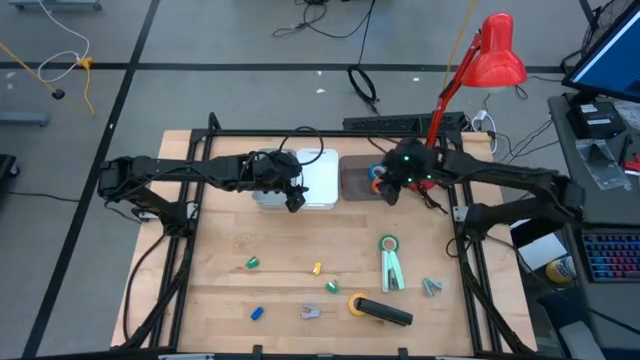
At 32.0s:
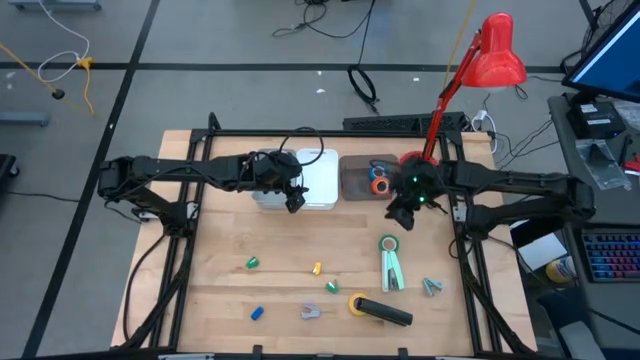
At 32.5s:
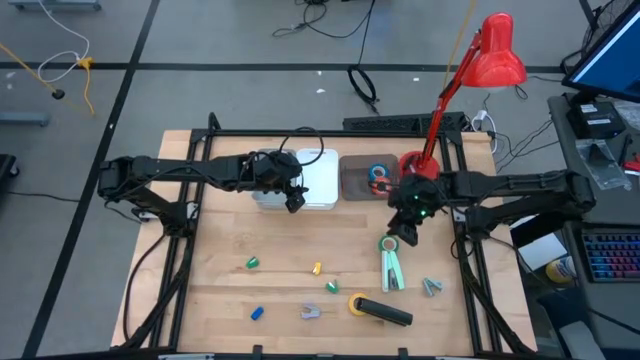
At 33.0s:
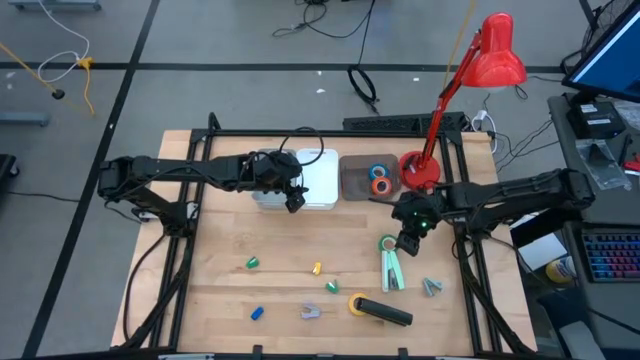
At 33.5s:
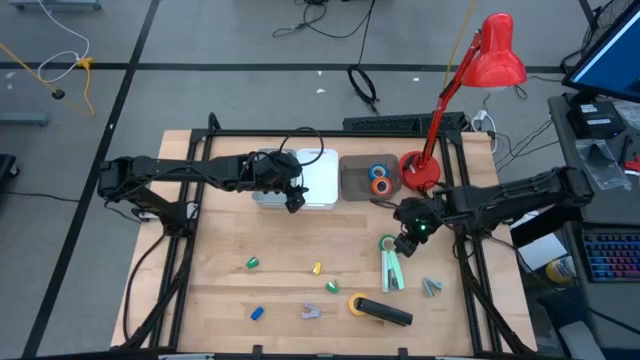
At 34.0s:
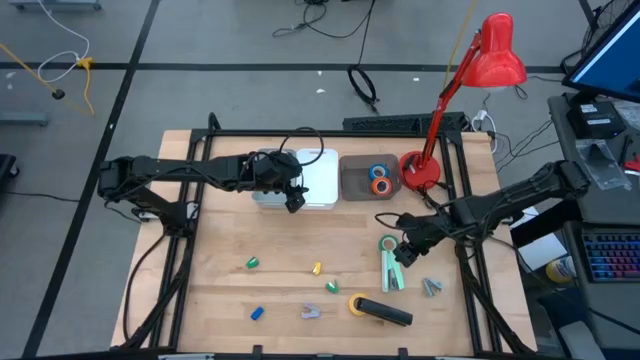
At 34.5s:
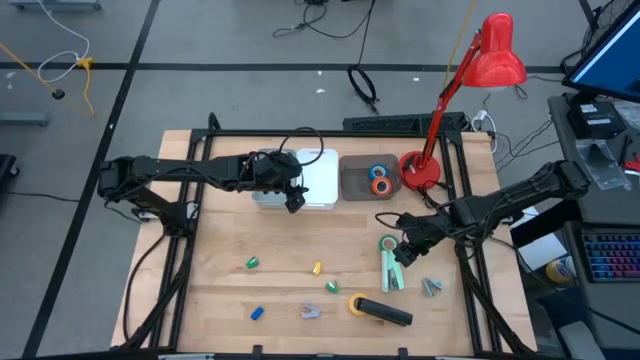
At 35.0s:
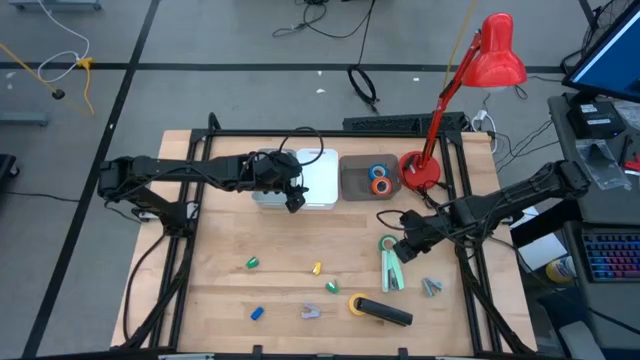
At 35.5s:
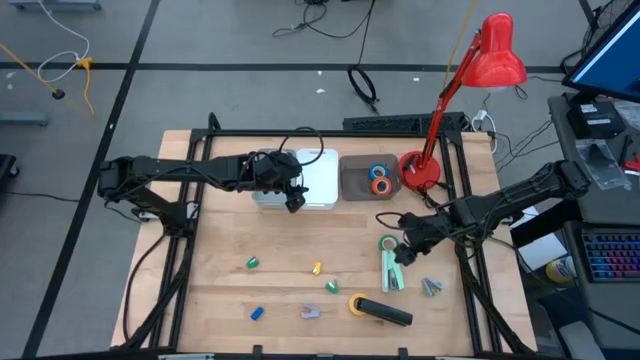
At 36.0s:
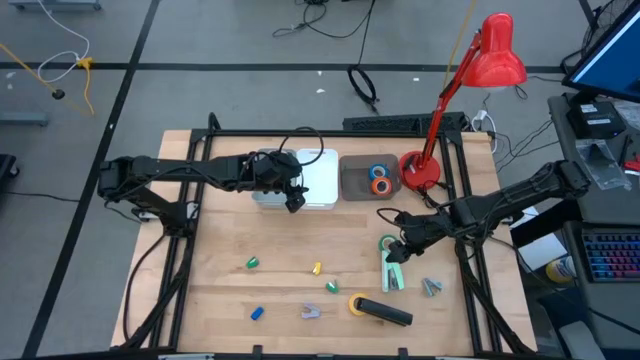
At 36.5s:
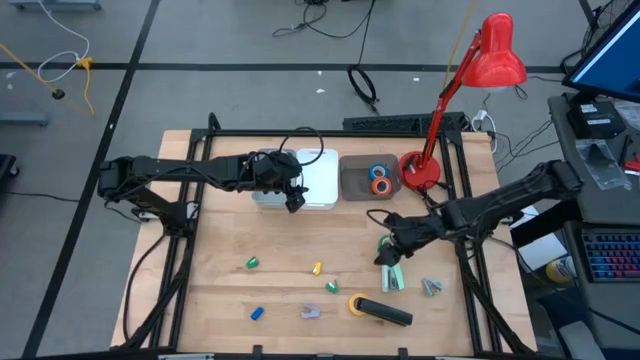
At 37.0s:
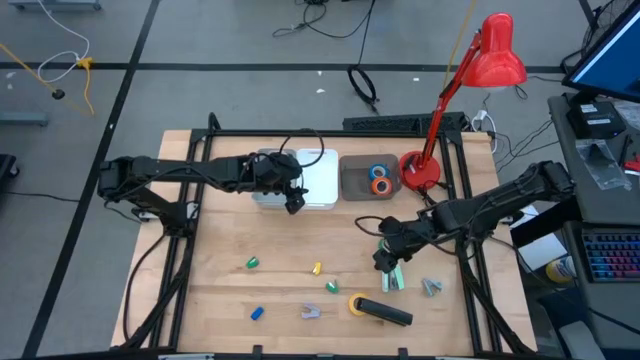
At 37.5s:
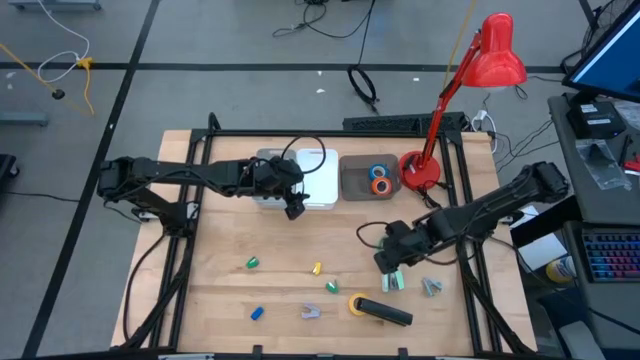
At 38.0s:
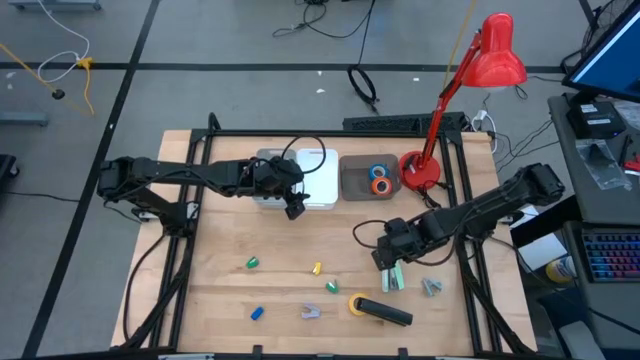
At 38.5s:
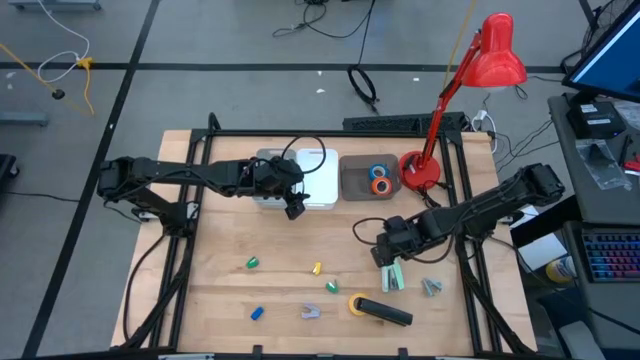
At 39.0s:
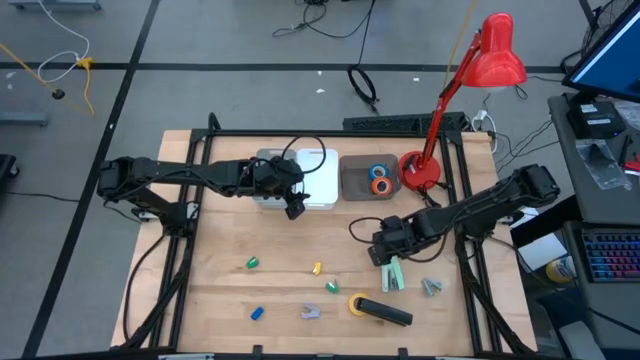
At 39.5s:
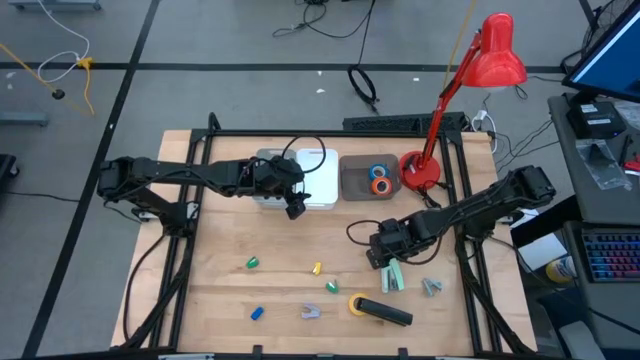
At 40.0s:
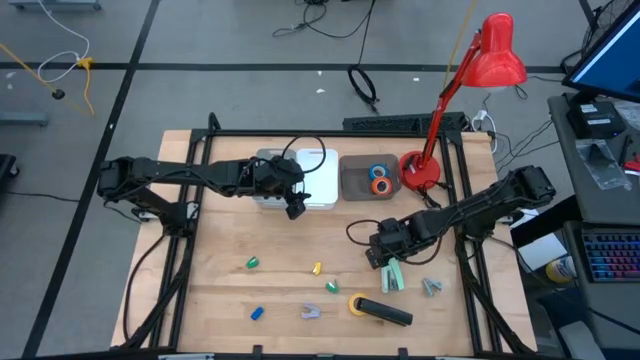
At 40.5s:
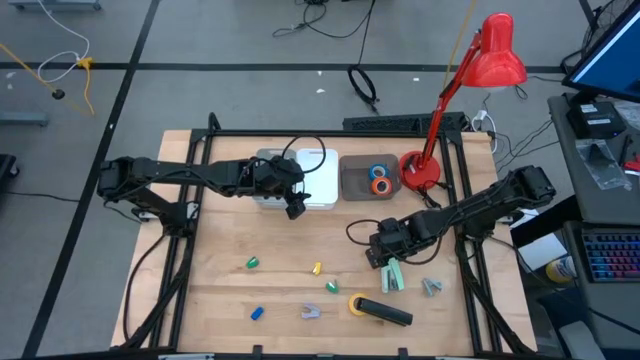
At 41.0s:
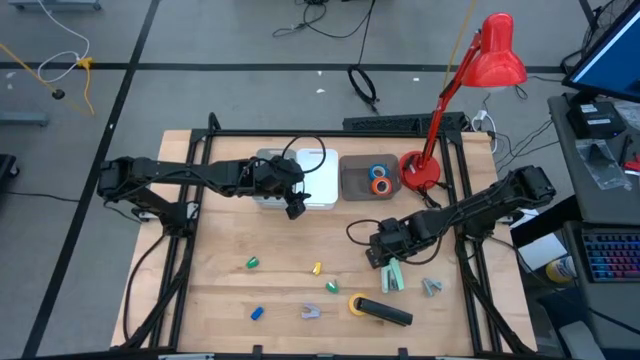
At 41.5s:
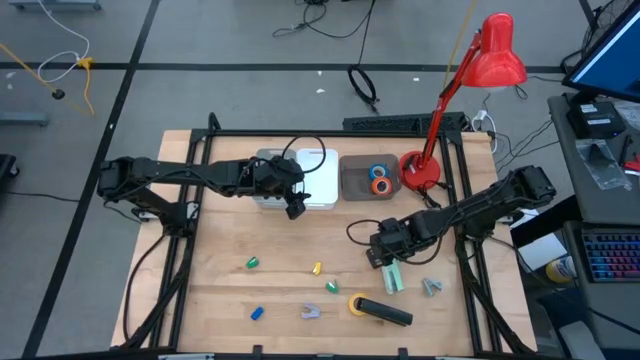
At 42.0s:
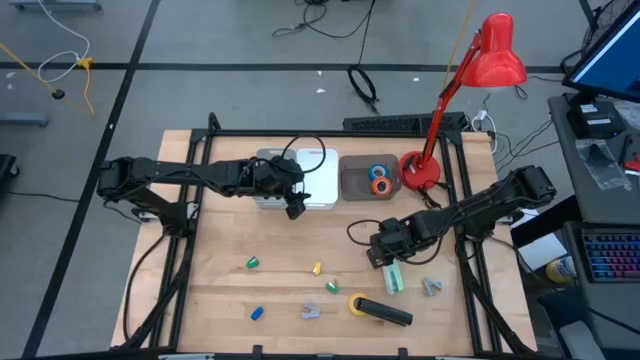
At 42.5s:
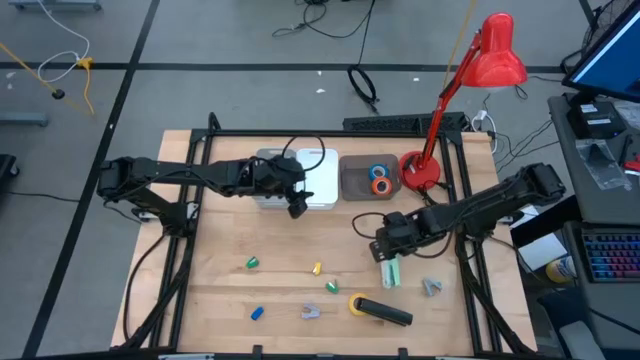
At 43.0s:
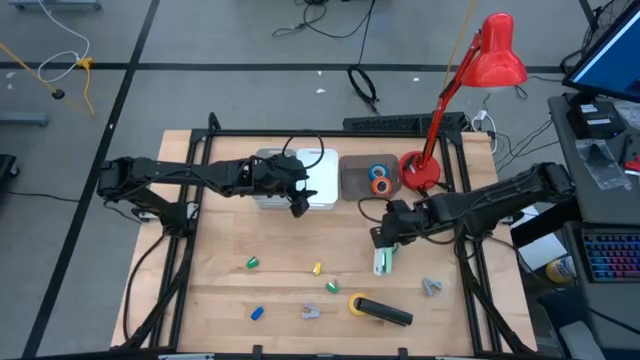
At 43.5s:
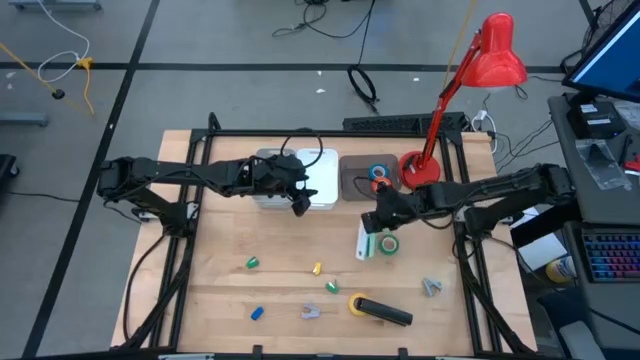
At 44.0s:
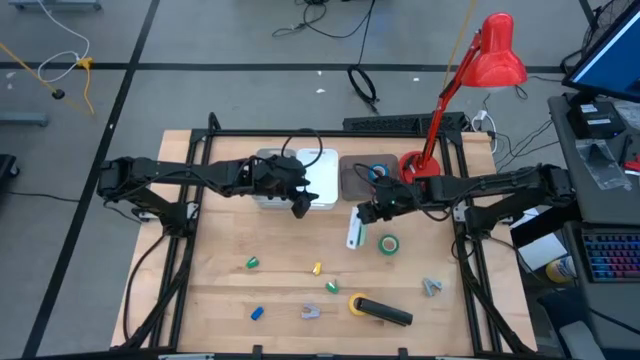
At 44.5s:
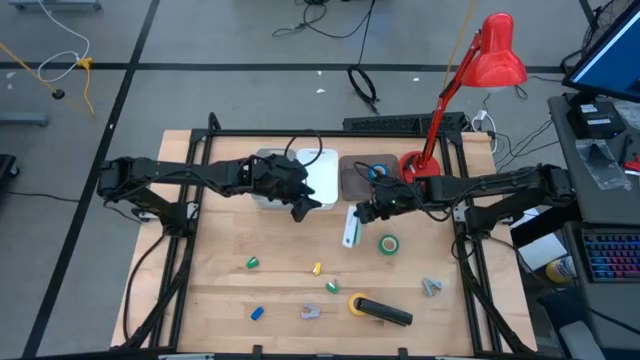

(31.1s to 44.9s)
Task: Pick and place Stapler, Stapler remover, tape
Put the blue stapler into the grey bin

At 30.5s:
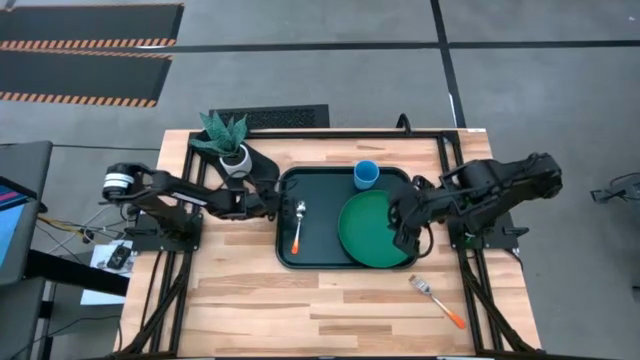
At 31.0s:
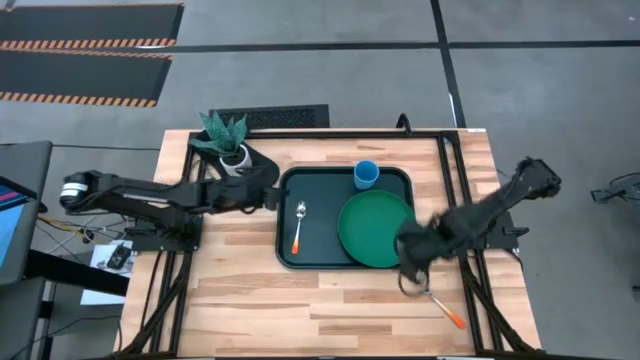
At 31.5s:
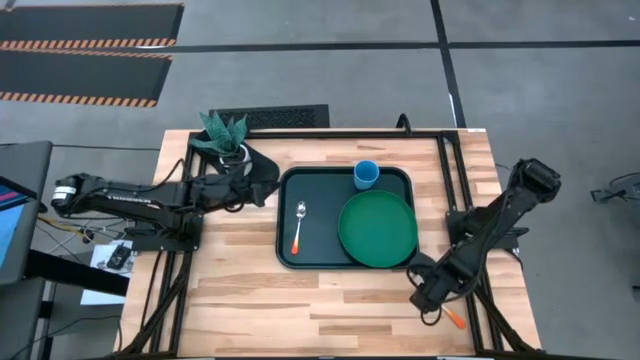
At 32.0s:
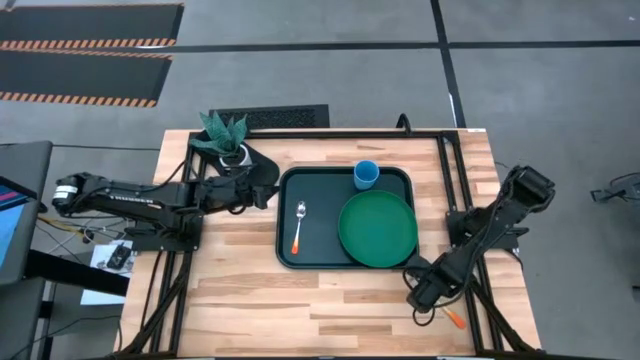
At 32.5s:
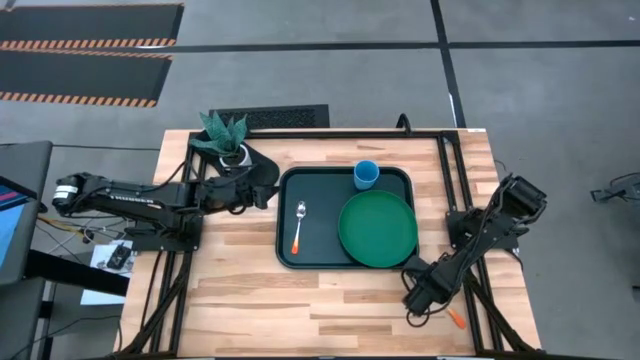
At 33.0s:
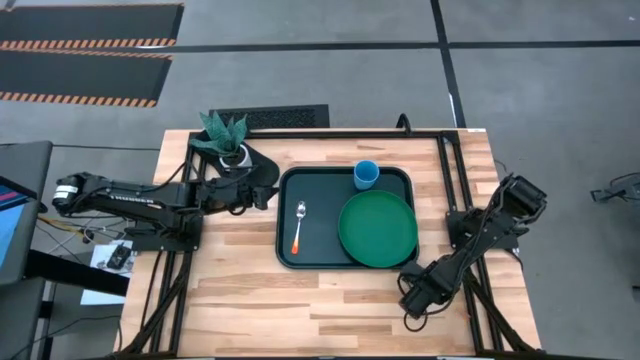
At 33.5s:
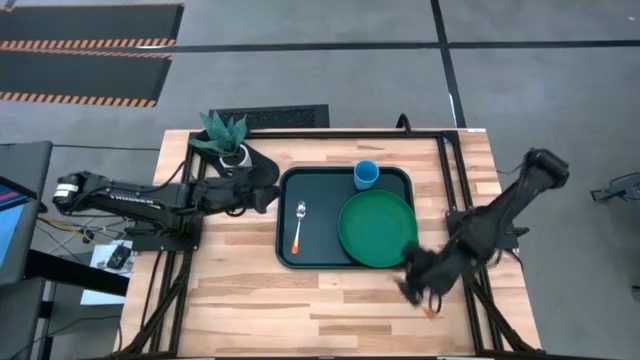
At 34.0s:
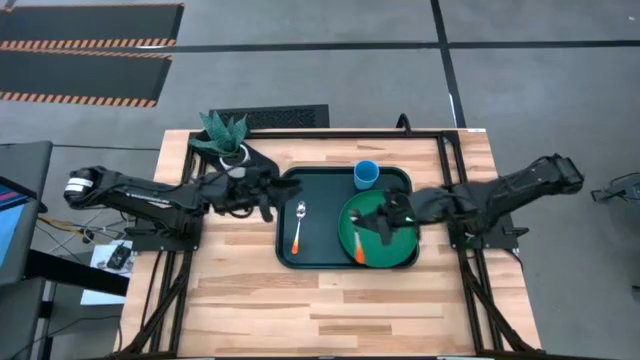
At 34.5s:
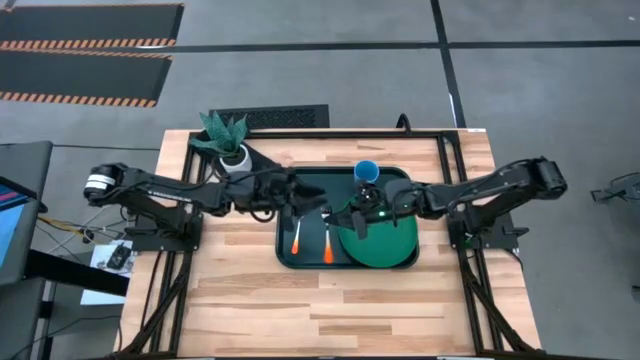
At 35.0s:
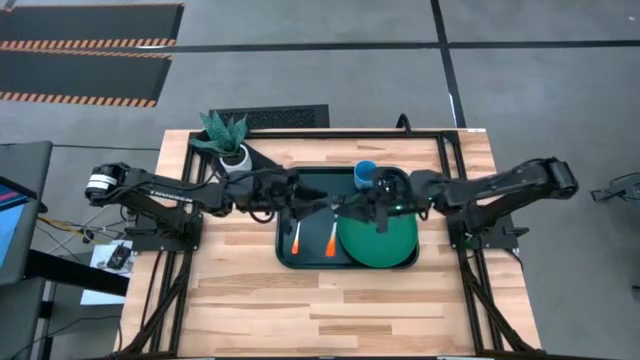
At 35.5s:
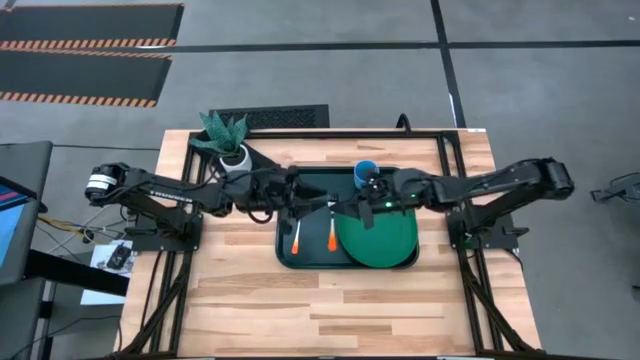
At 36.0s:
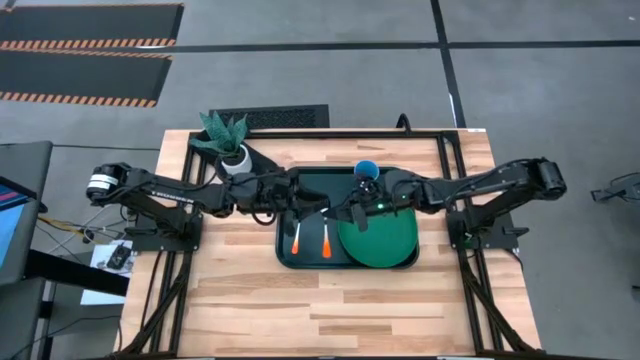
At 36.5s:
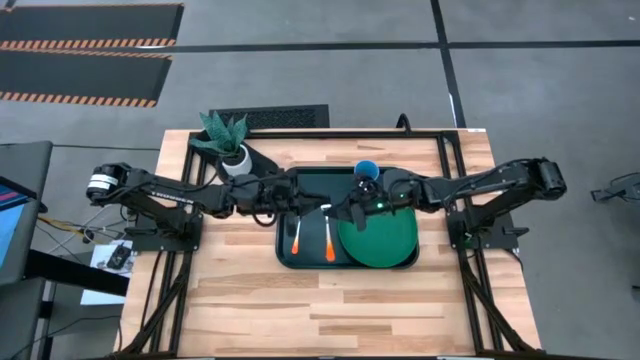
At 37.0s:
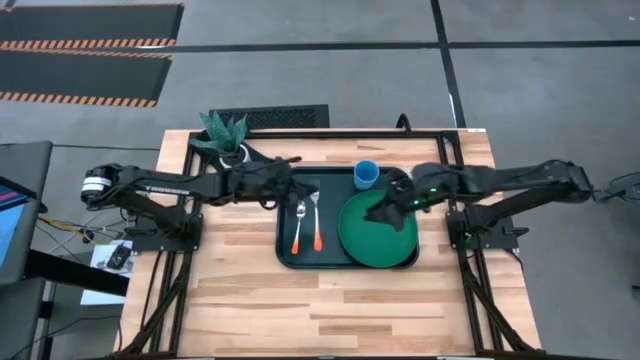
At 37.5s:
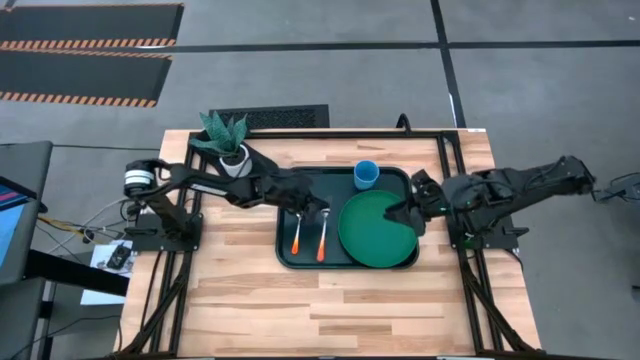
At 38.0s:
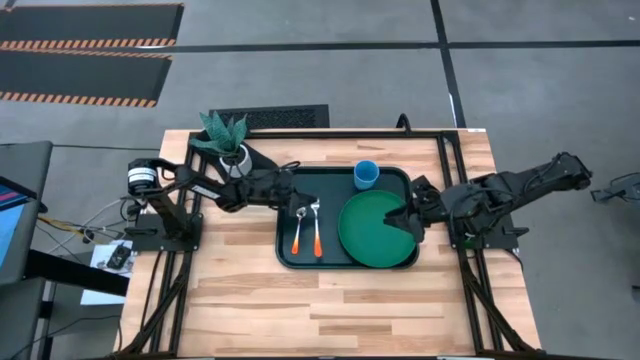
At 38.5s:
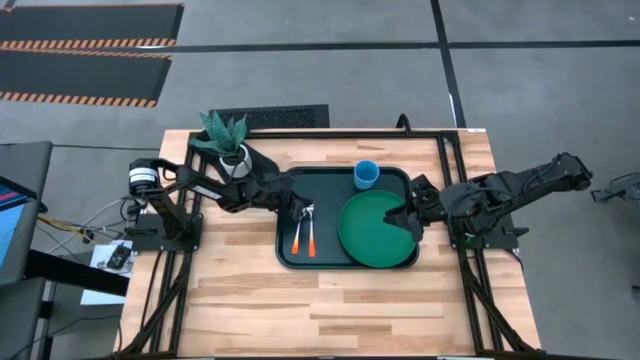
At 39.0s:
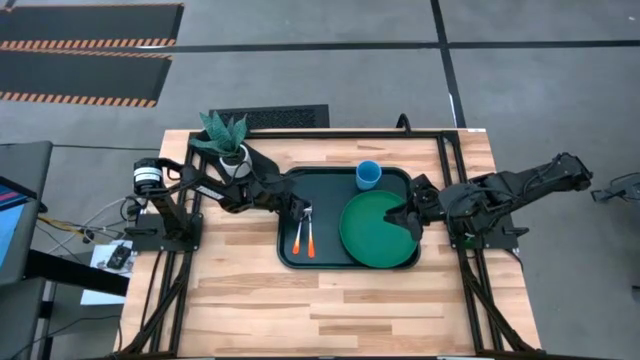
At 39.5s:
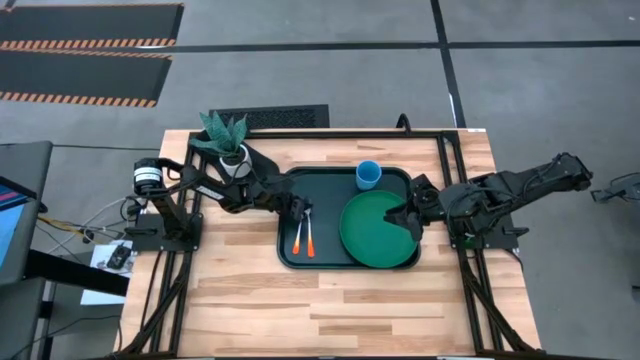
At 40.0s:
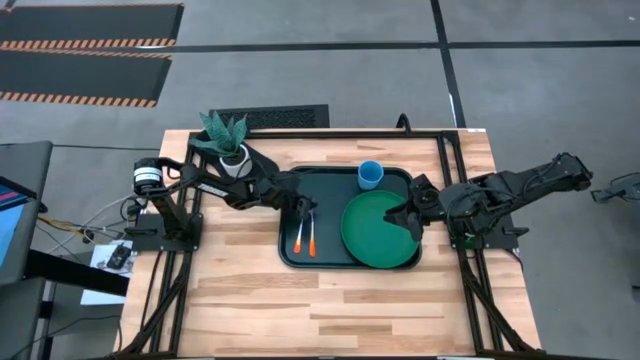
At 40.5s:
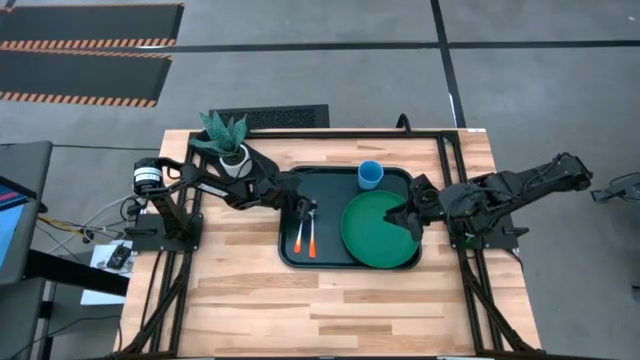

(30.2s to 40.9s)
Task: Pick and place plate/cup/fork/spoon on tray
Put the orange fork on the dark green serving tray to the right of the orange spoon
